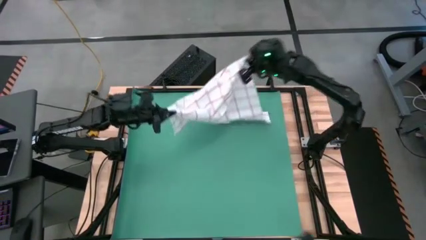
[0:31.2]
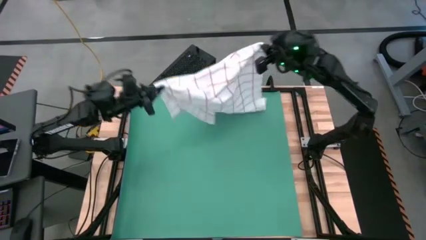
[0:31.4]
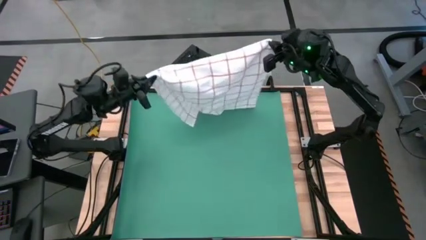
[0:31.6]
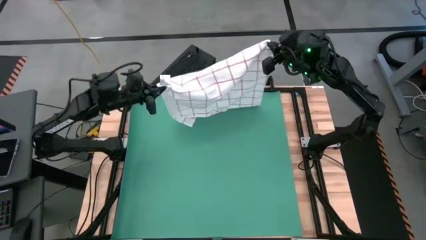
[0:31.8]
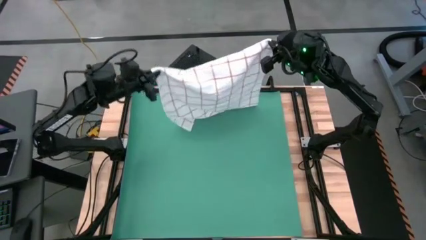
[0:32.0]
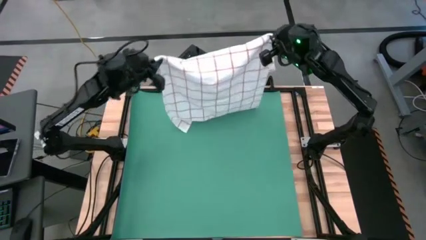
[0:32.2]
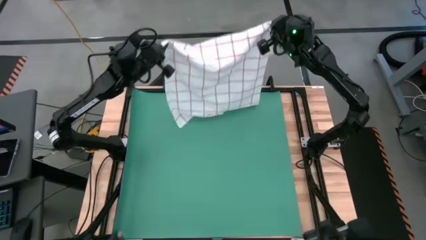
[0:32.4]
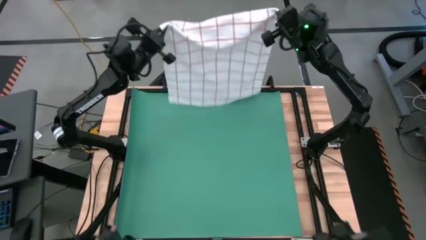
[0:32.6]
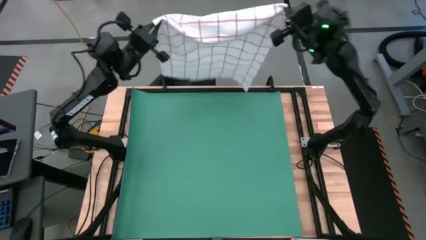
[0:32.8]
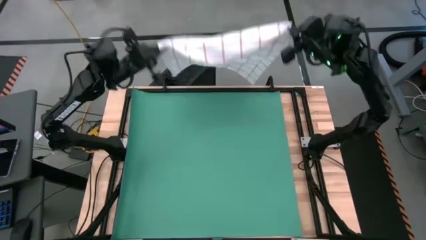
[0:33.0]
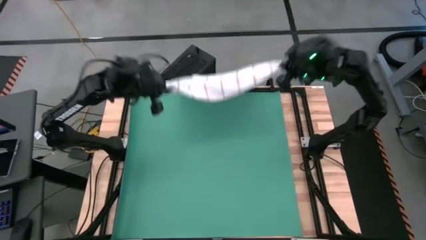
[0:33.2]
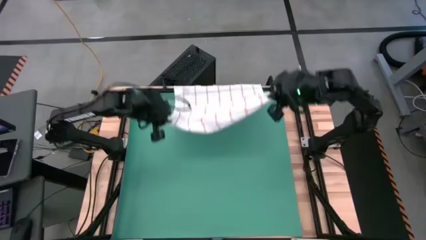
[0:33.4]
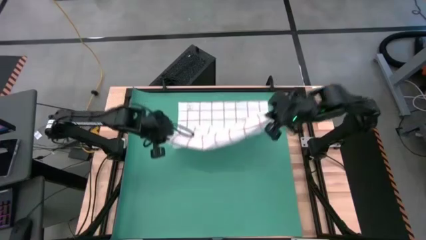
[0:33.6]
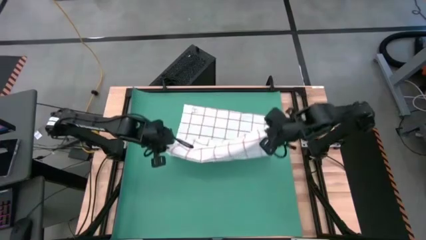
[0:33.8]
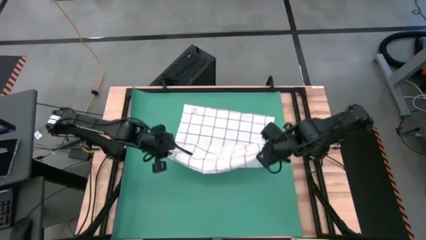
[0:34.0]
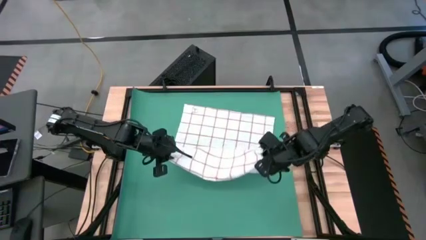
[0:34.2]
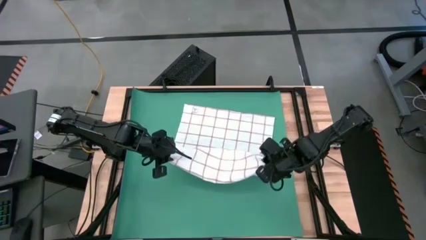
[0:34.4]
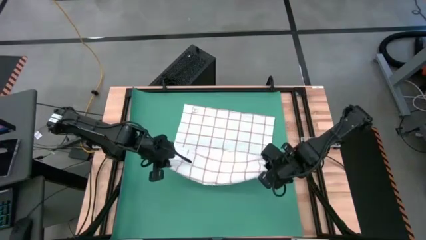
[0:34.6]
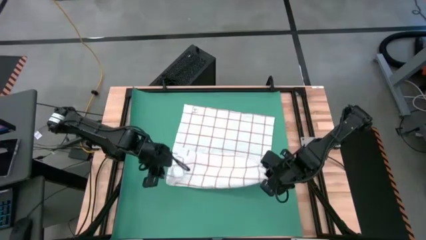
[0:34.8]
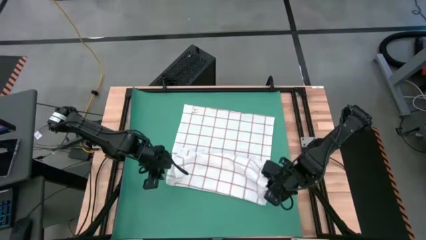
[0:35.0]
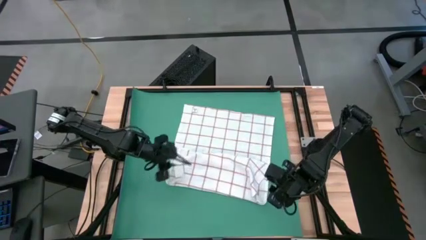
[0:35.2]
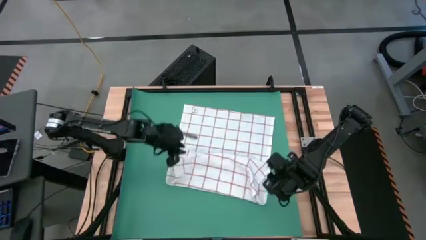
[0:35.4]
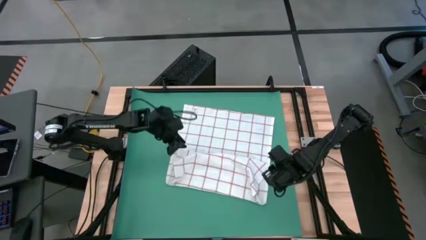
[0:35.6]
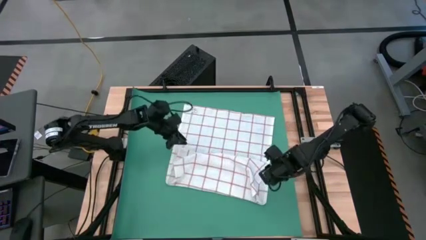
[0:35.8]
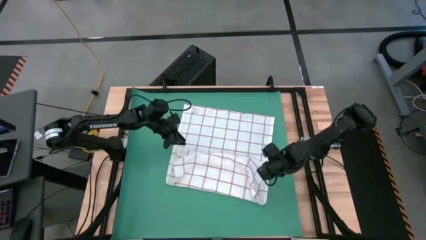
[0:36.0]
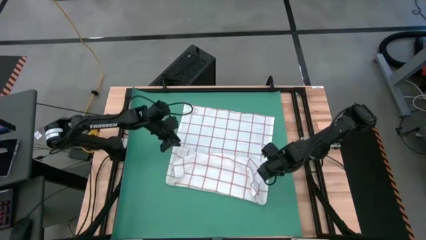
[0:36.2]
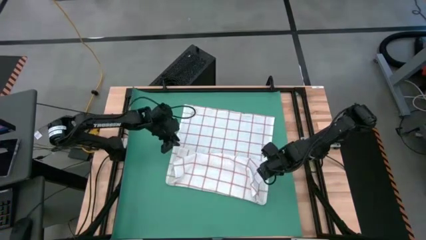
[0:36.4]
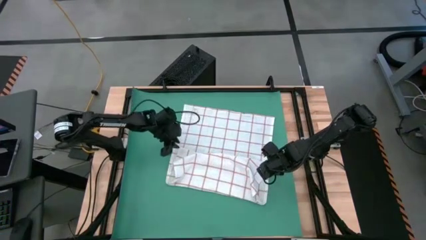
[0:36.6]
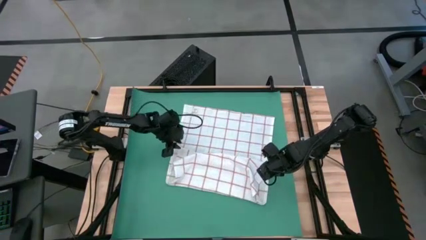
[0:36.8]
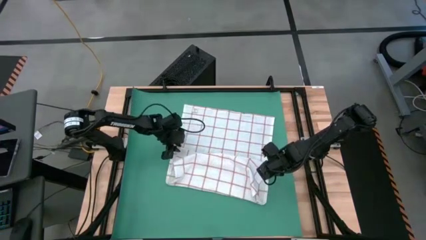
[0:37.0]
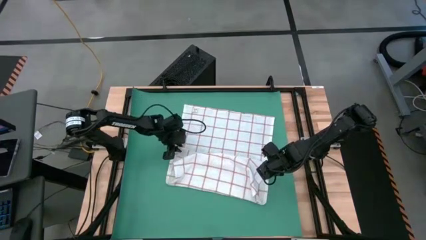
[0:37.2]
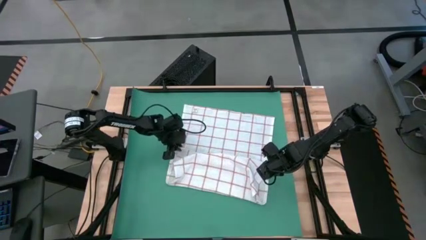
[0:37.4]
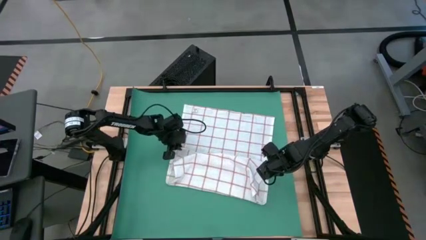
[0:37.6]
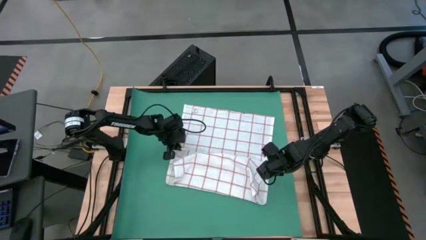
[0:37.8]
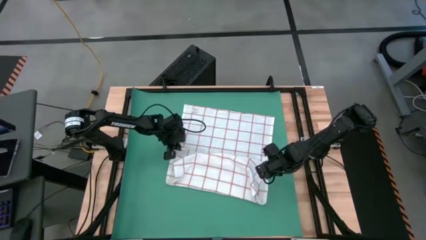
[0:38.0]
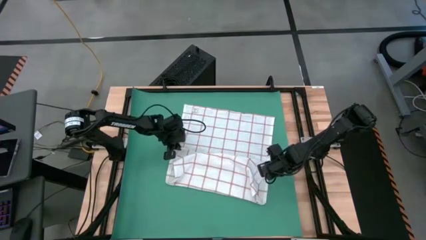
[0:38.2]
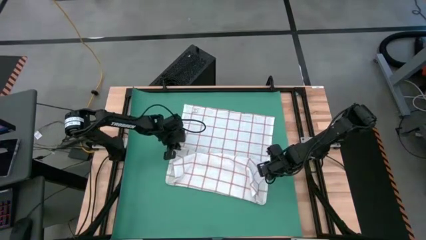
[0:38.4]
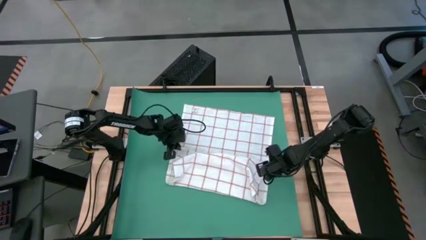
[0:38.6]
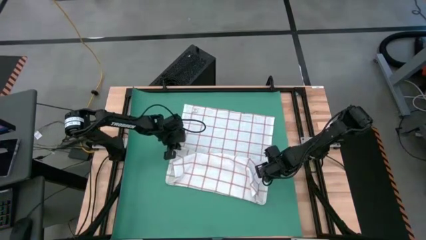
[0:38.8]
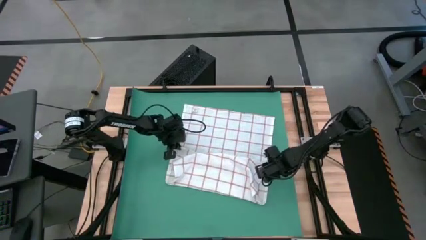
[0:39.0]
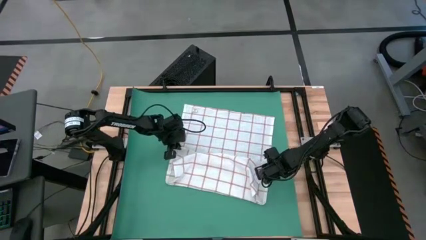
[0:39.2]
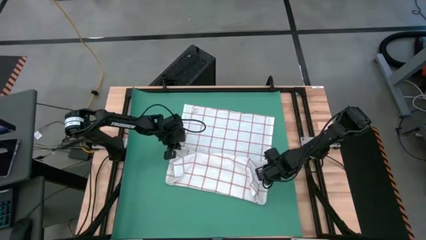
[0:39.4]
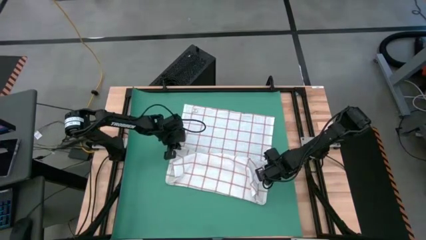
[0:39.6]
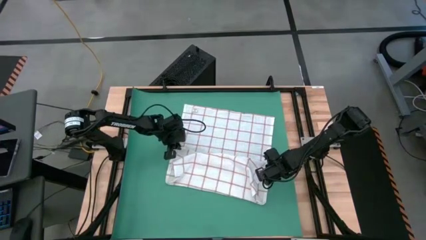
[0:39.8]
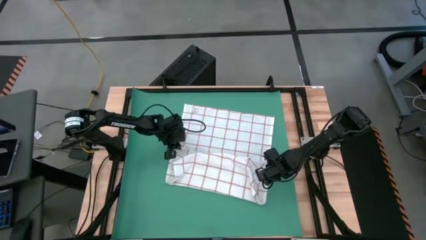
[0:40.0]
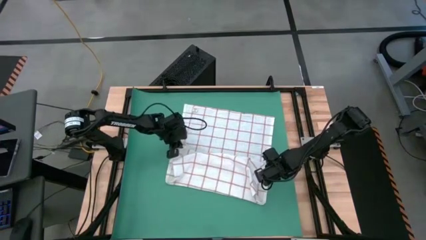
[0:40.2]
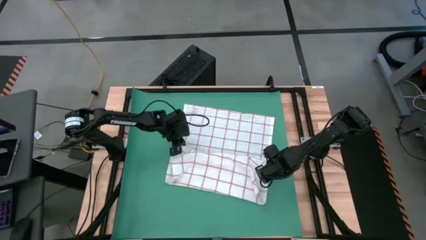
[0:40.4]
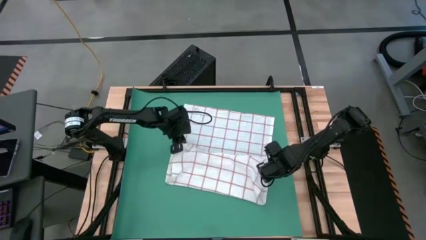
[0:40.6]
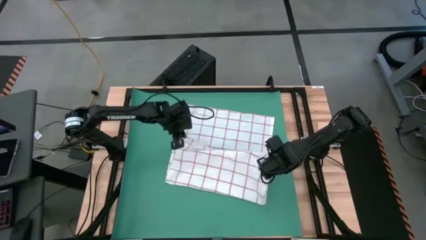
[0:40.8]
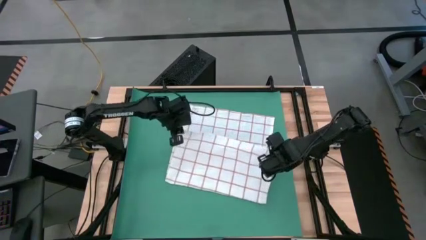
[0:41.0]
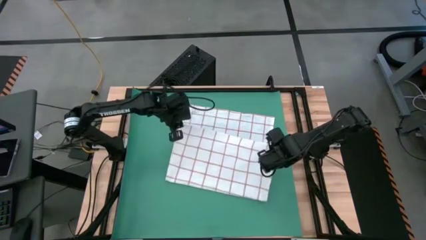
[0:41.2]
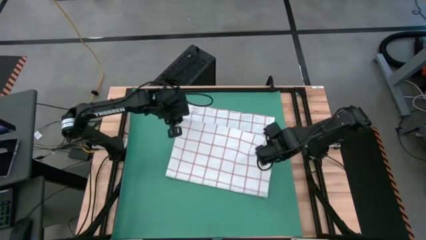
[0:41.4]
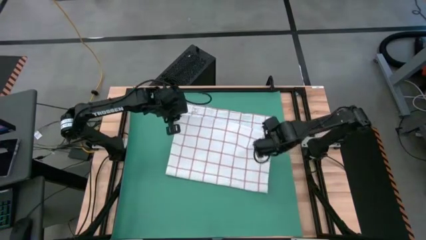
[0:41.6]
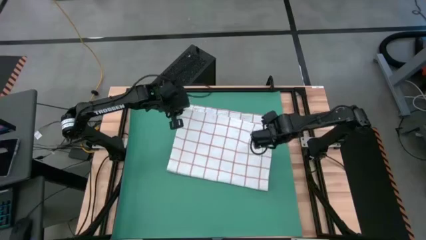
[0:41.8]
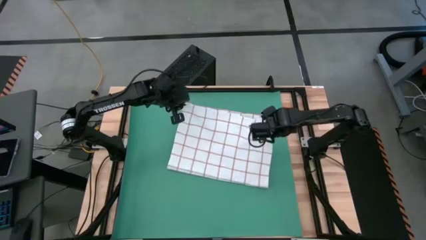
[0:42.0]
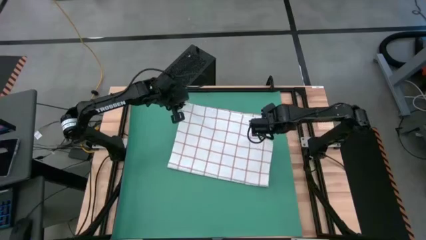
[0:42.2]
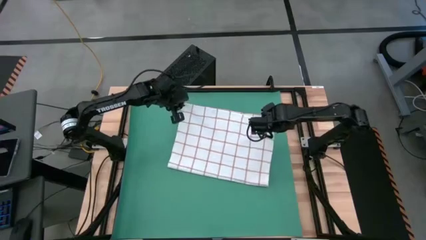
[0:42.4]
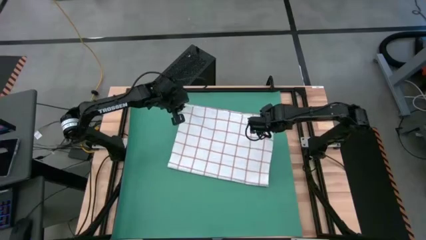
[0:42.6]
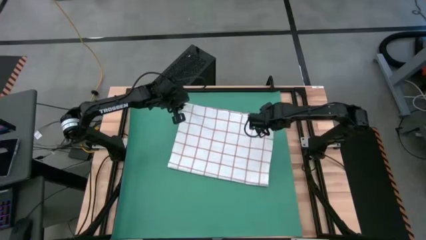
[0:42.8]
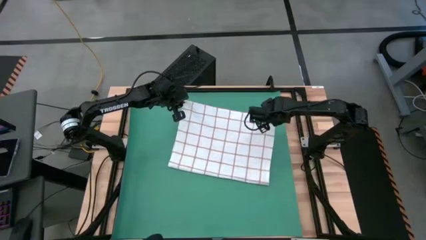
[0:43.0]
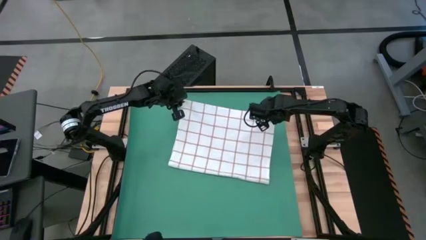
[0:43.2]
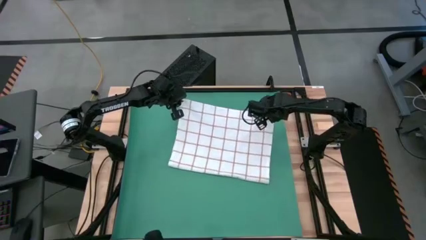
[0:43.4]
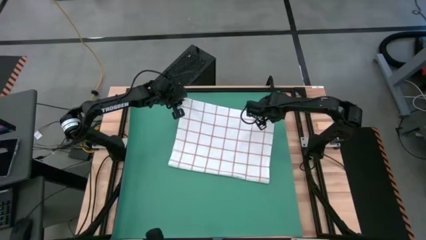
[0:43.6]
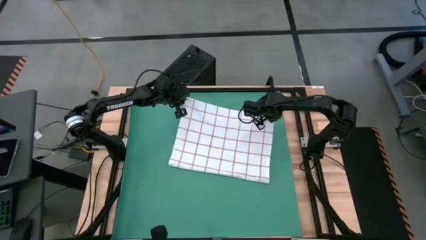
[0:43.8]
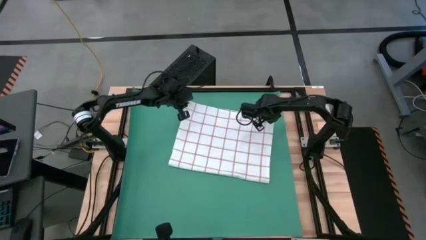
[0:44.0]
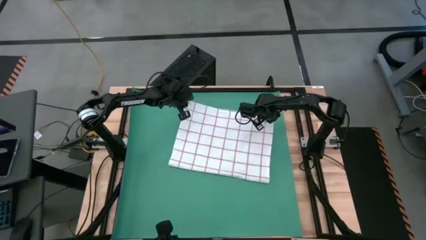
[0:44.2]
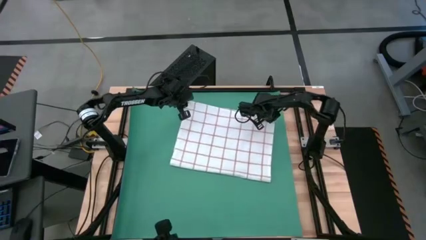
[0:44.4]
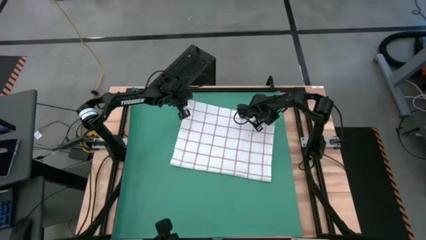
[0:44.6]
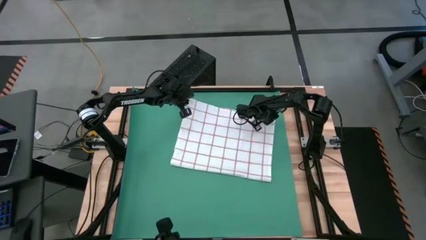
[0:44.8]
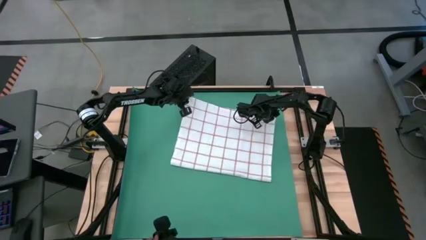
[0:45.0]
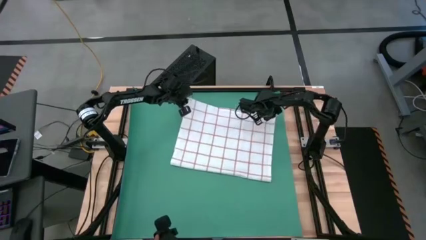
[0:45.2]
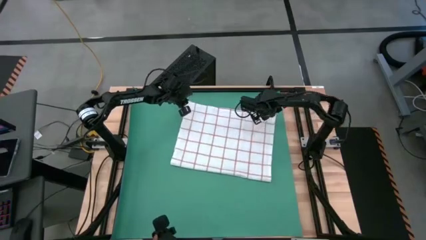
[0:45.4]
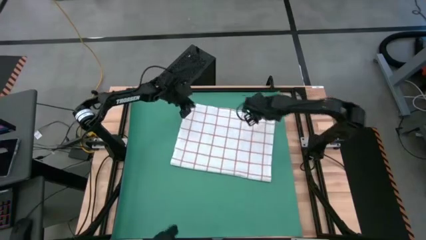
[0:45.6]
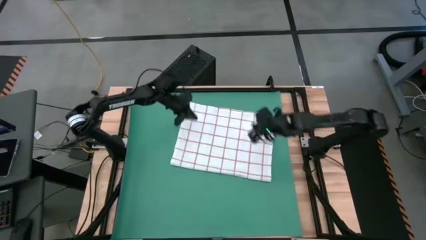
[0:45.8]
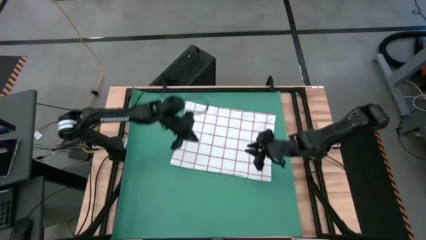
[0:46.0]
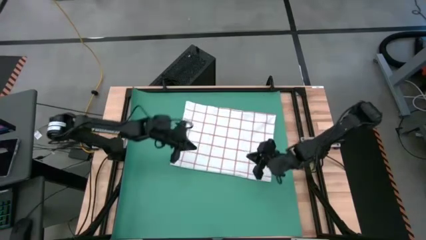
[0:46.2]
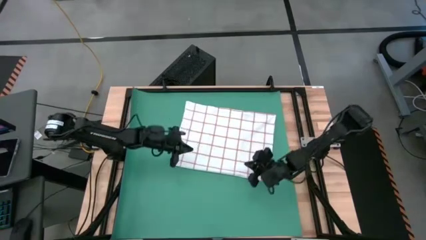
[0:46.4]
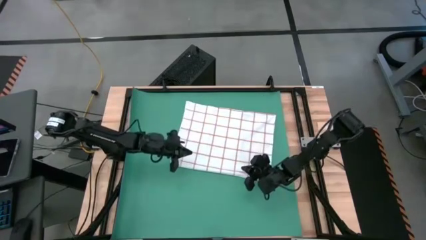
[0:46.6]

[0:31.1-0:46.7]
Task: Roll towel
Roll the white towel
